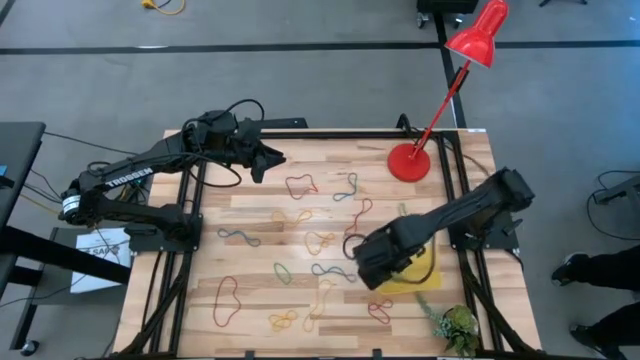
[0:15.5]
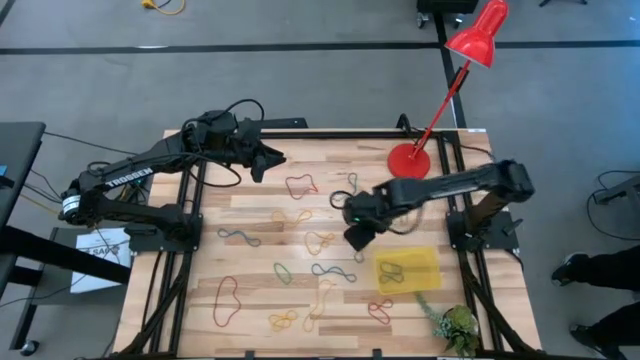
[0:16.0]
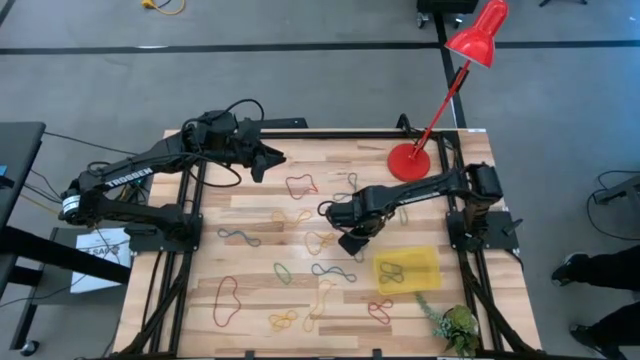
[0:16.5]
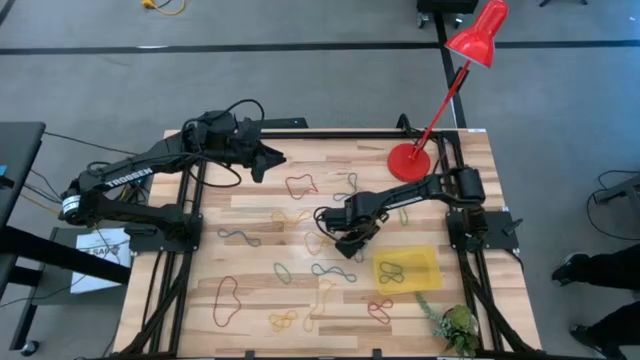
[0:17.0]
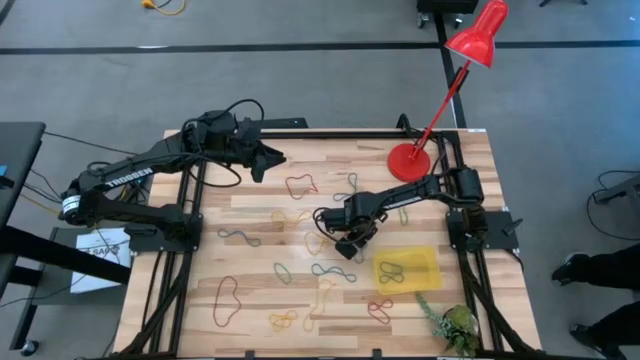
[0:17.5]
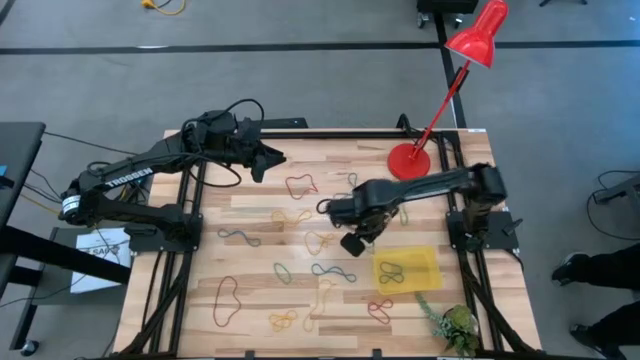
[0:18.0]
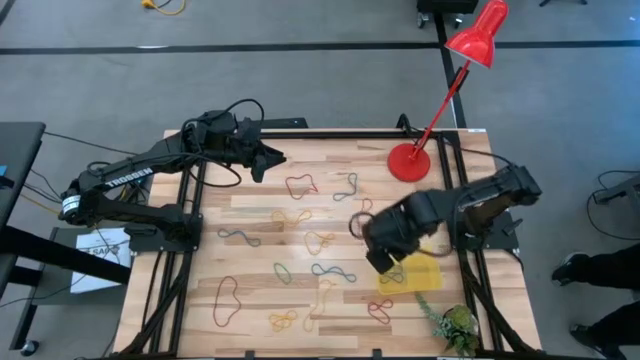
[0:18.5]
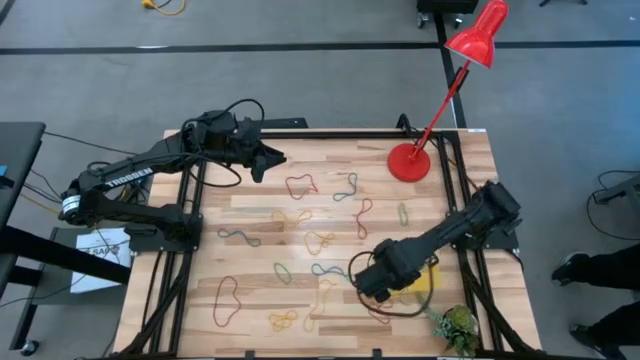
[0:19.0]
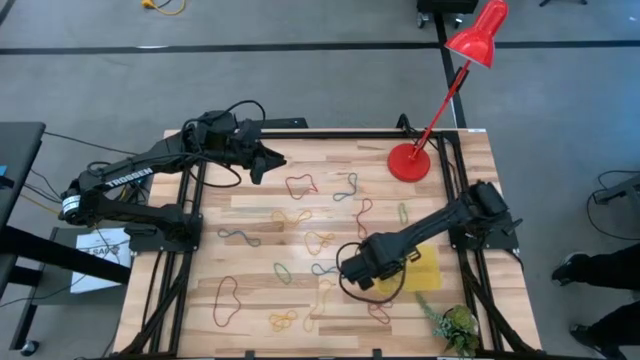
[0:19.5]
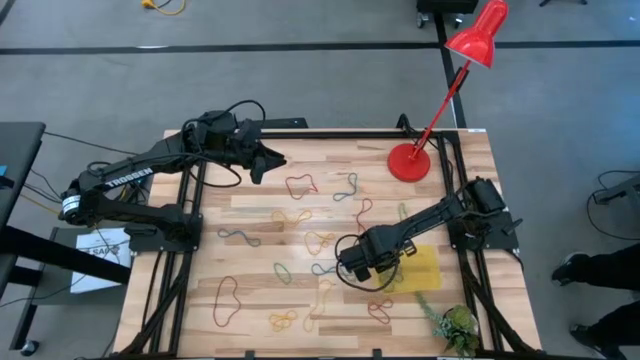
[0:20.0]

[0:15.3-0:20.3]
Task: Pick and place items into bin
Put the blue rubber band into the yellow bin

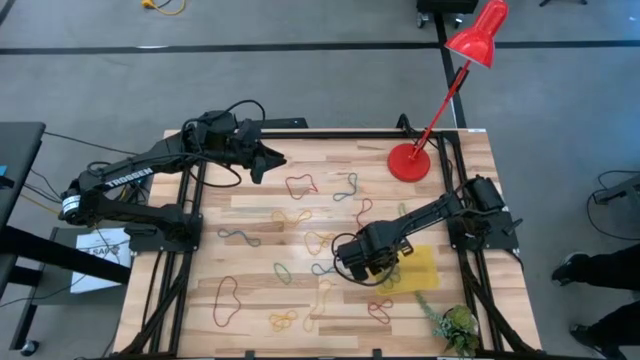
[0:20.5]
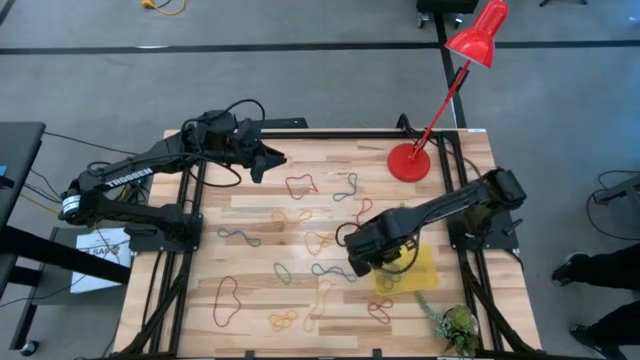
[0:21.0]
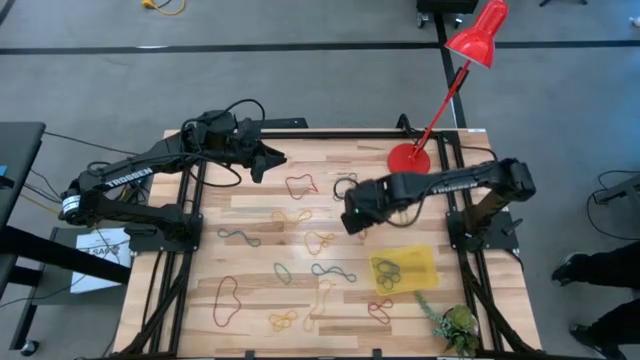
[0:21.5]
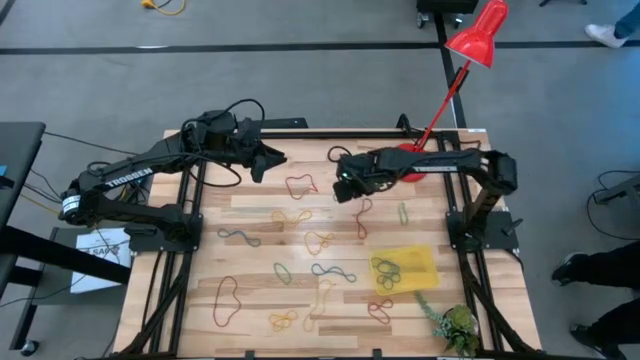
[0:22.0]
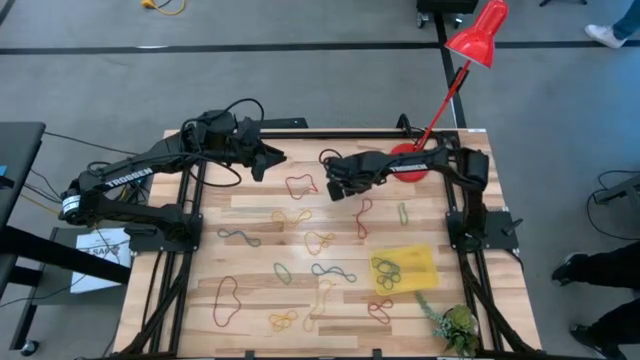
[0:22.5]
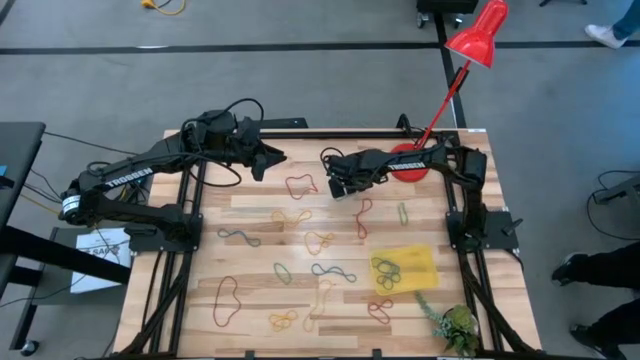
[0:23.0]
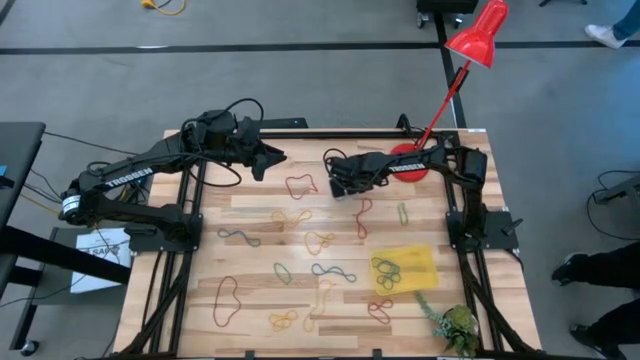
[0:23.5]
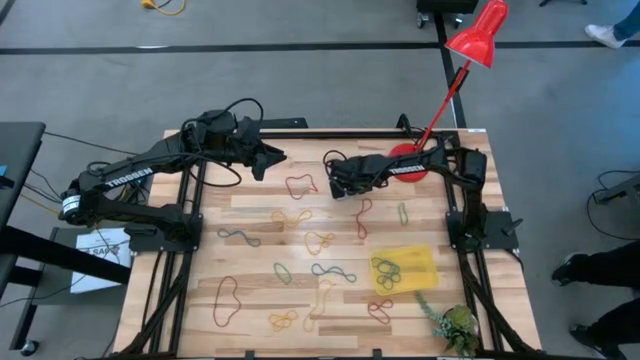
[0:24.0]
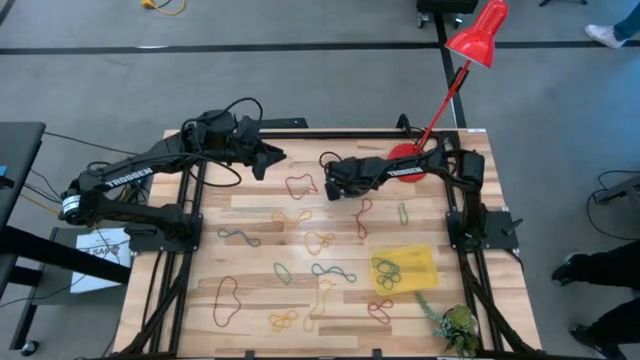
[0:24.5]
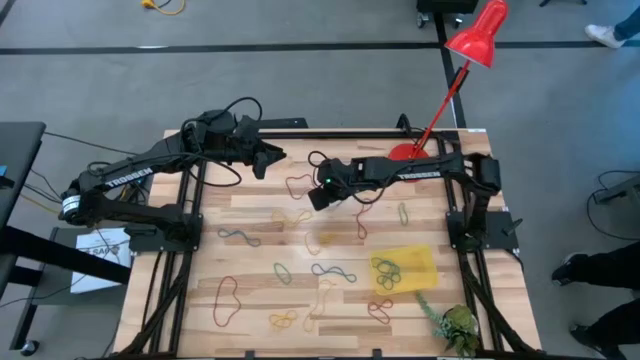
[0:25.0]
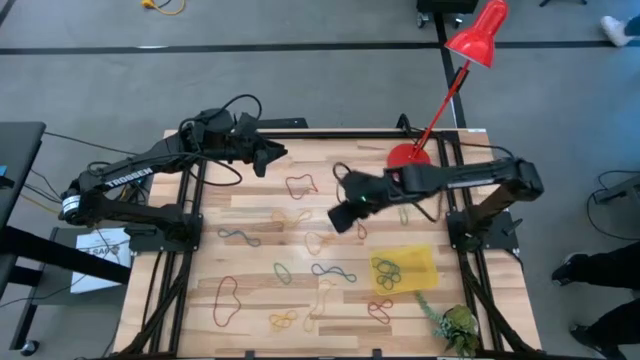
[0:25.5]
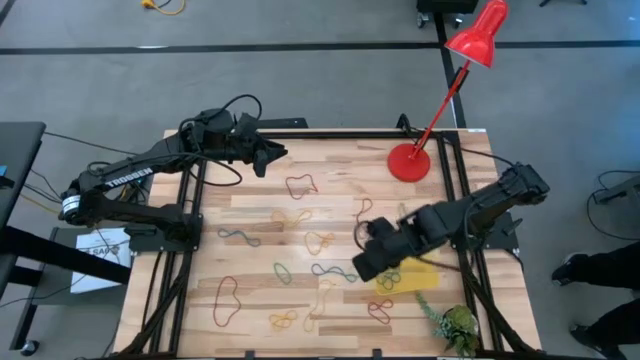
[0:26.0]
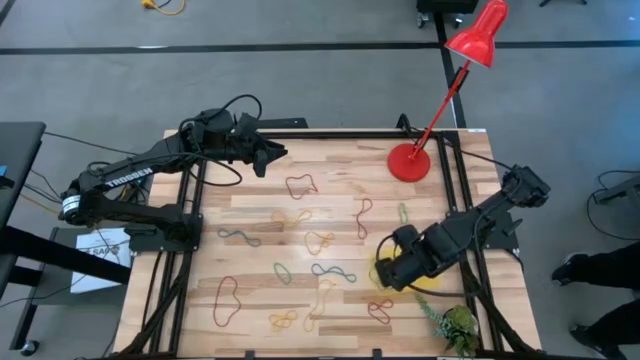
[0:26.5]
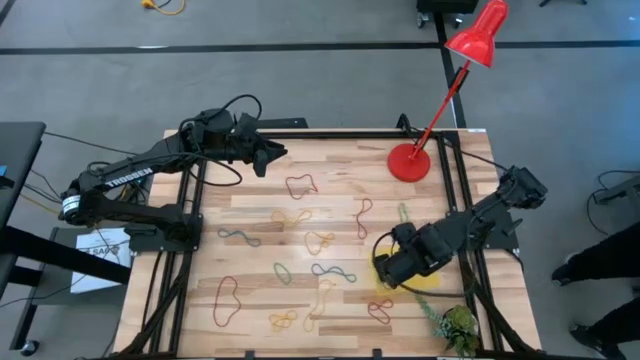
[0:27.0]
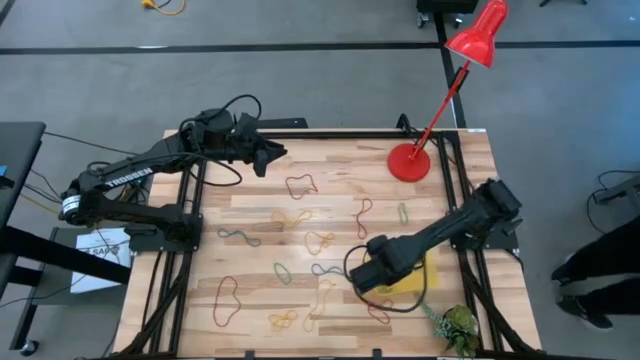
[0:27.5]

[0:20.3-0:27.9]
Put the blue rubber band into the yellow bin

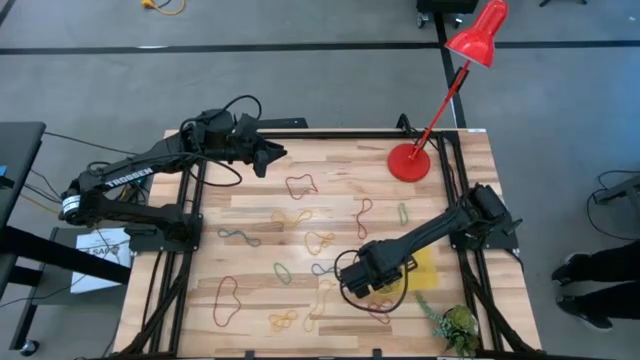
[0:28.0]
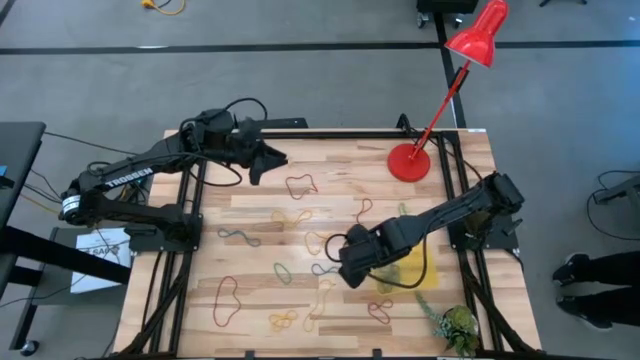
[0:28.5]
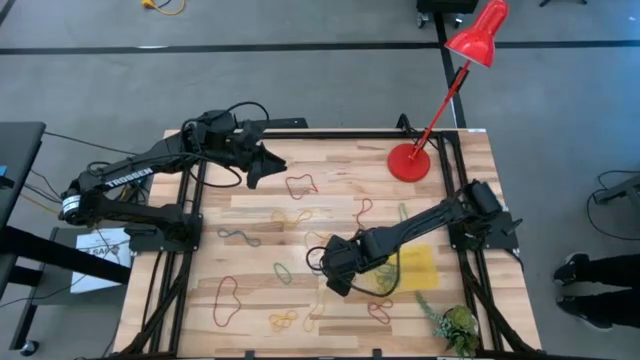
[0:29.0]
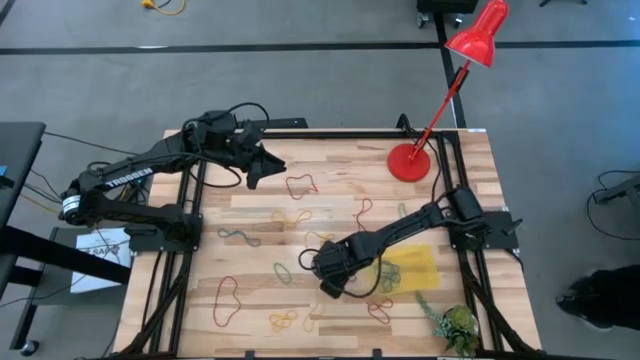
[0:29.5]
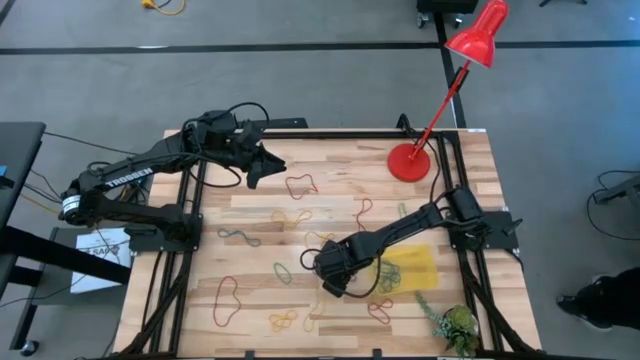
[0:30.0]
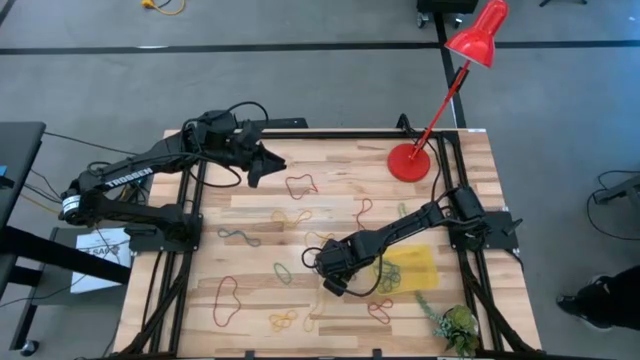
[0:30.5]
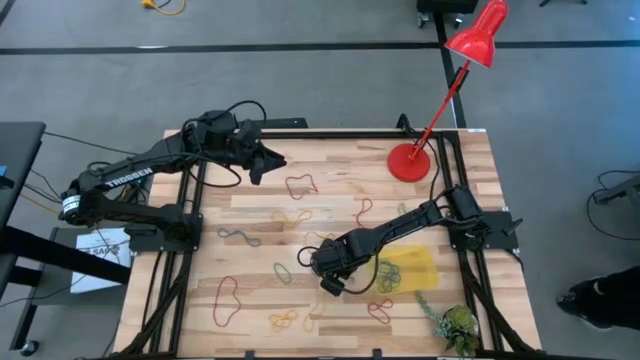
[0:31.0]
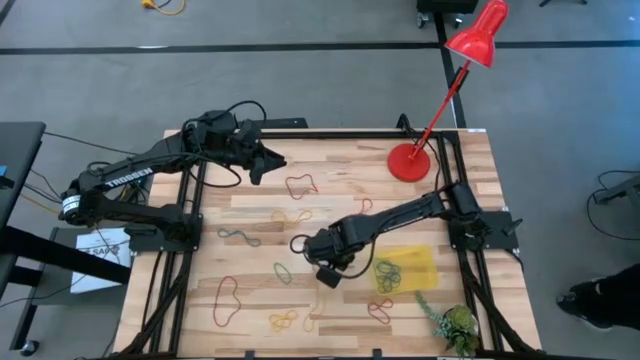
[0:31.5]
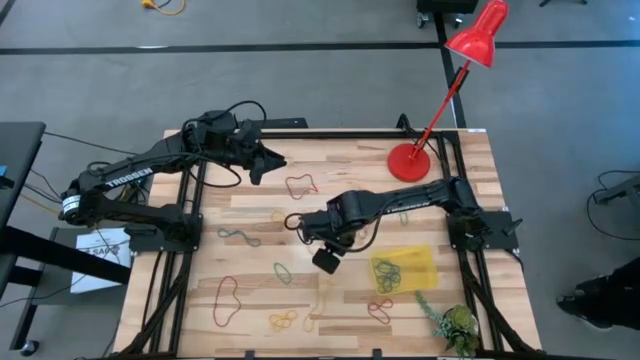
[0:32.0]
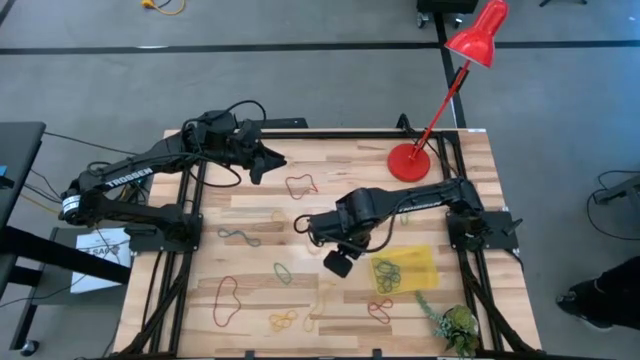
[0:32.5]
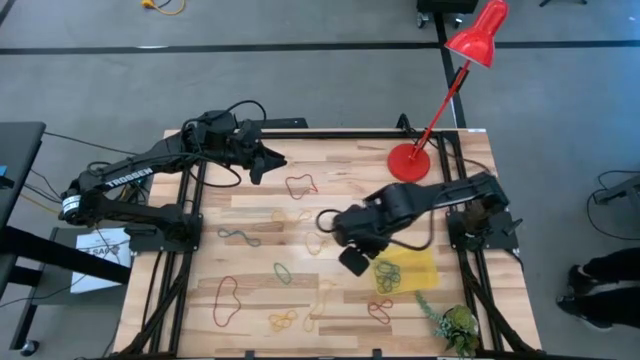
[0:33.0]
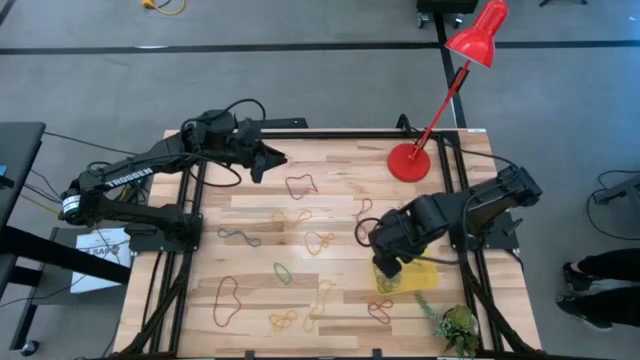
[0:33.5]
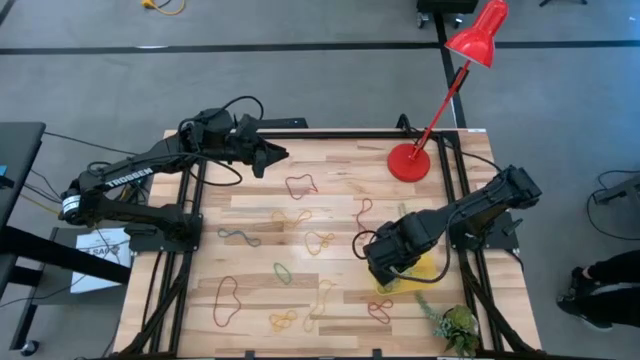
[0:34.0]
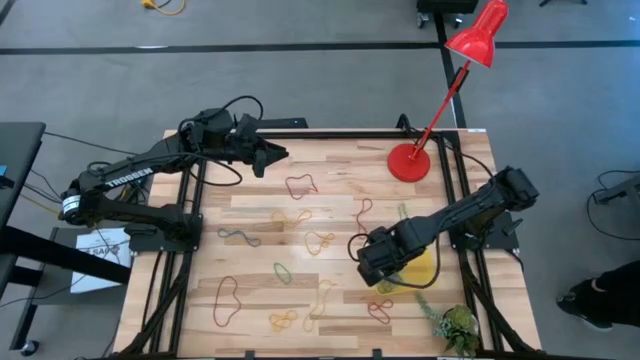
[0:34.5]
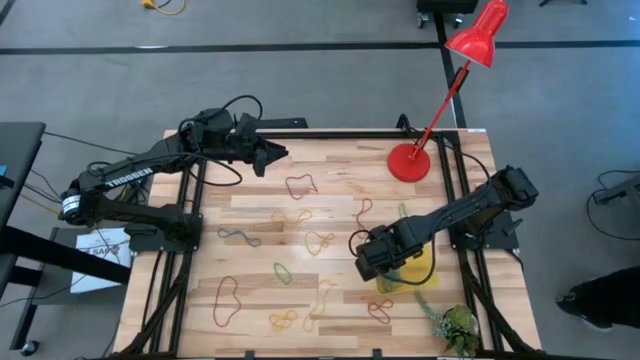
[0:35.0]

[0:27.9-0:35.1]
Put the blue rubber band into the yellow bin

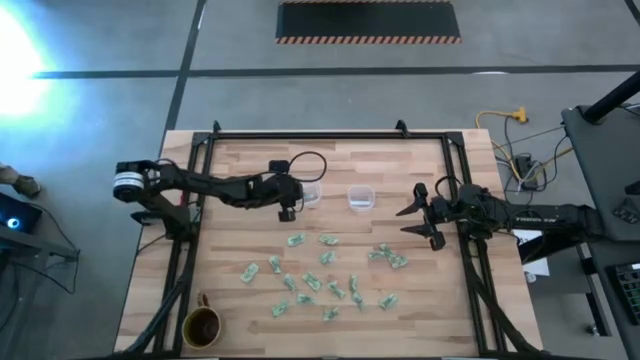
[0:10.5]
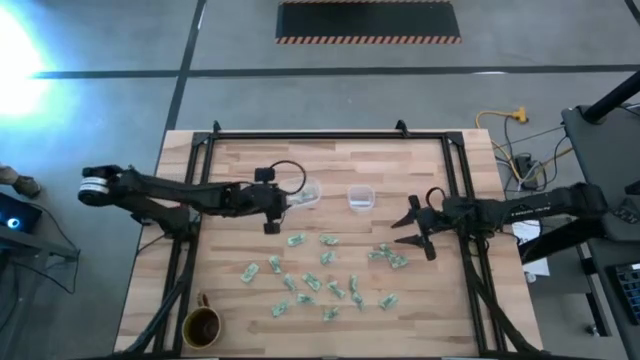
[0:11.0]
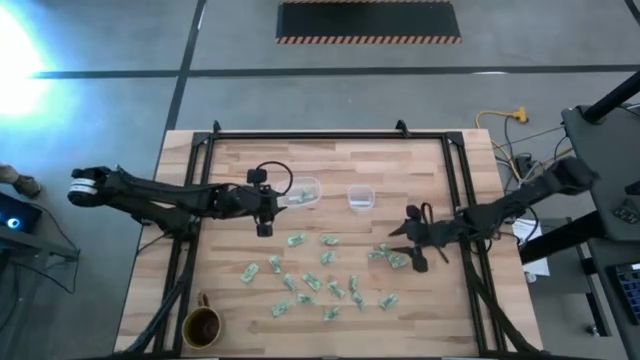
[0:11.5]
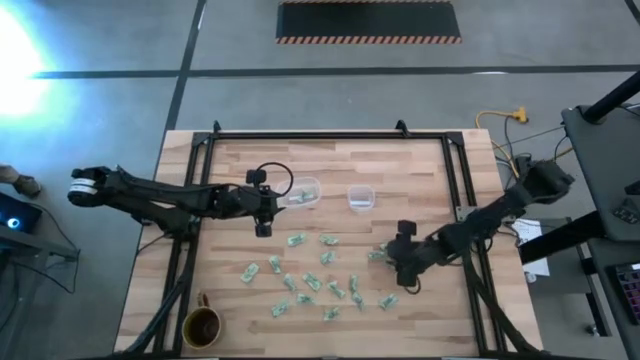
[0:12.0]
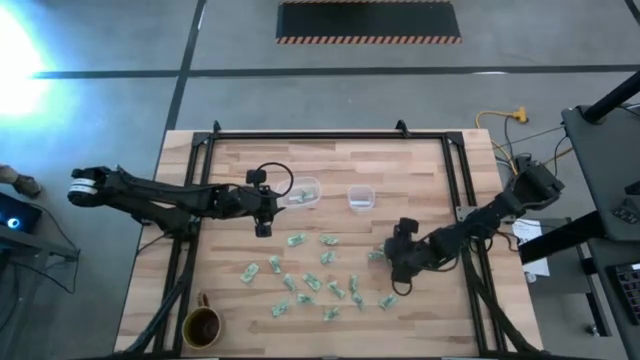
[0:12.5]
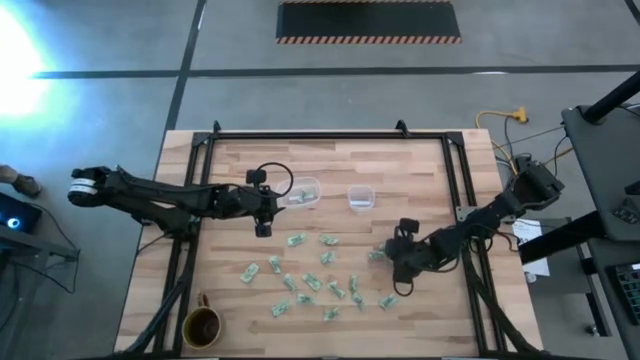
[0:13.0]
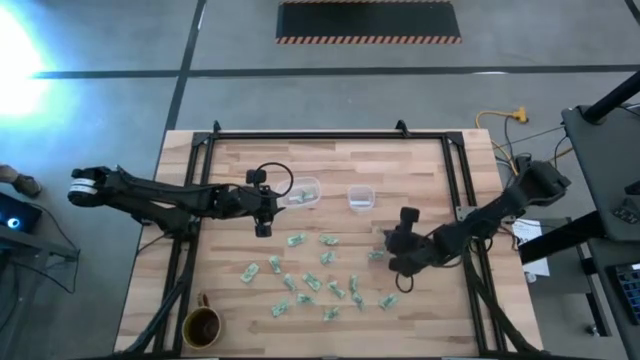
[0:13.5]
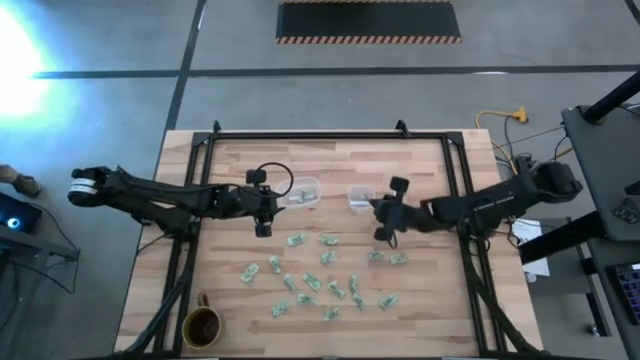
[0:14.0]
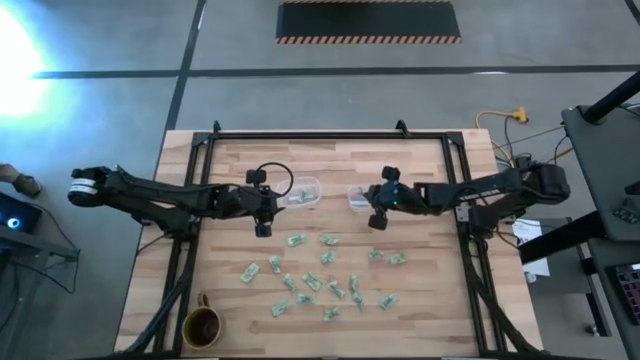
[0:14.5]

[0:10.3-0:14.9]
Task: Pick and place Stevia / Truvia into bins
Put the stevia packet into the transparent square container
